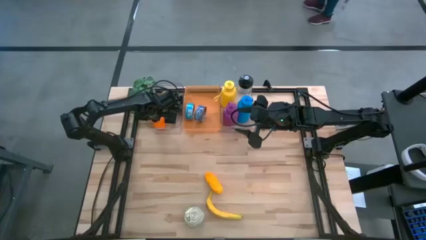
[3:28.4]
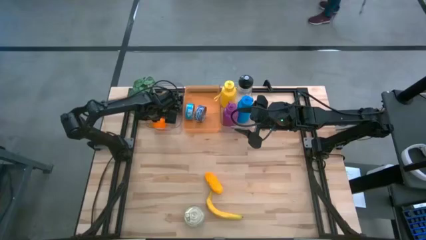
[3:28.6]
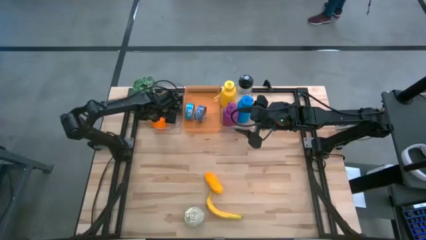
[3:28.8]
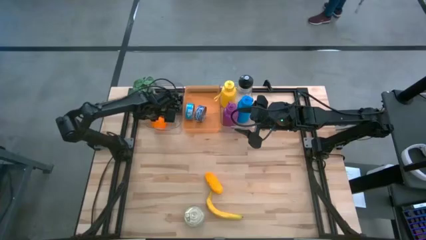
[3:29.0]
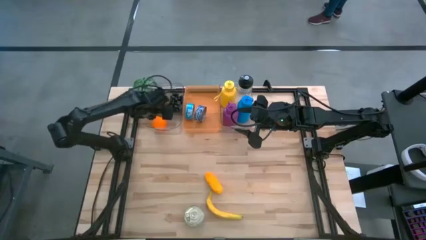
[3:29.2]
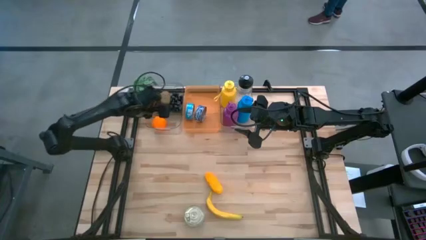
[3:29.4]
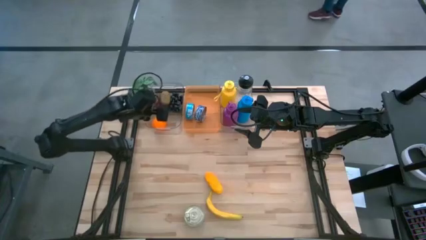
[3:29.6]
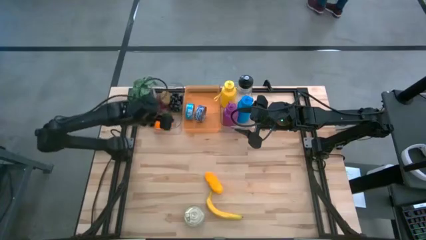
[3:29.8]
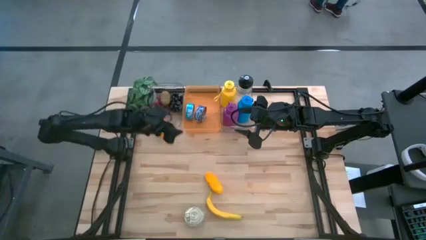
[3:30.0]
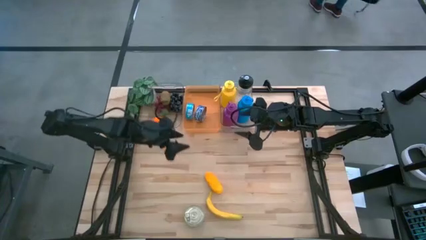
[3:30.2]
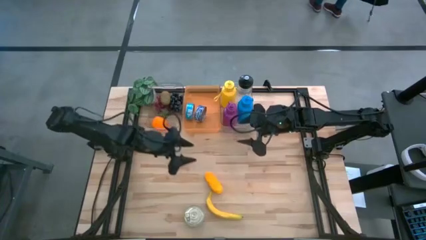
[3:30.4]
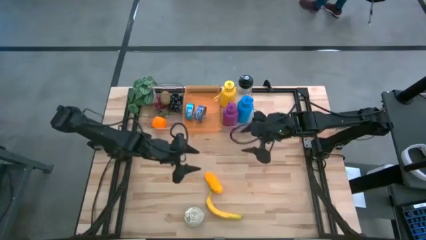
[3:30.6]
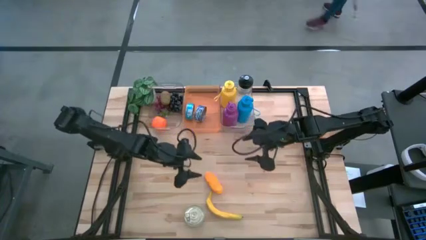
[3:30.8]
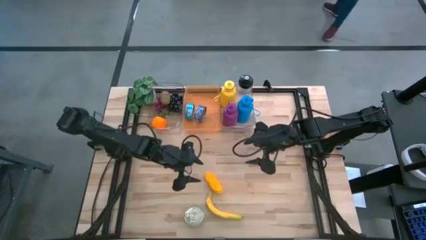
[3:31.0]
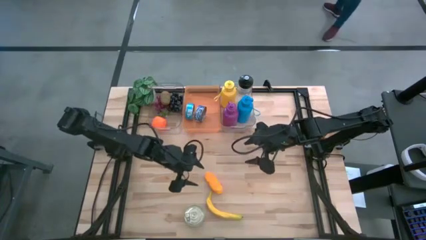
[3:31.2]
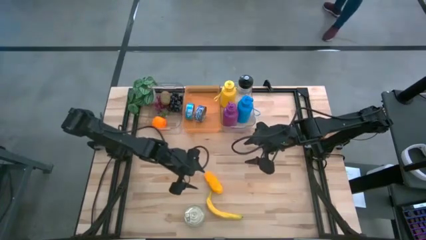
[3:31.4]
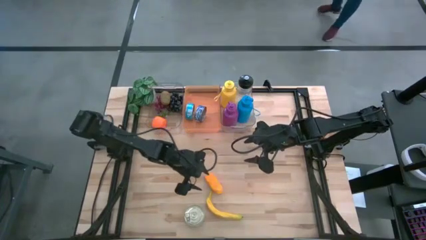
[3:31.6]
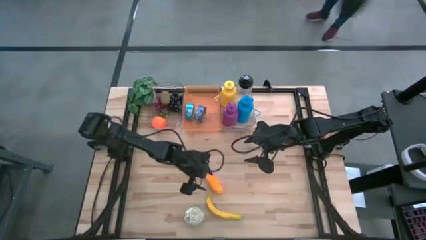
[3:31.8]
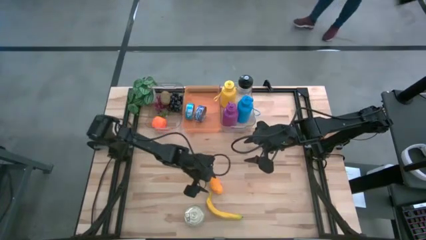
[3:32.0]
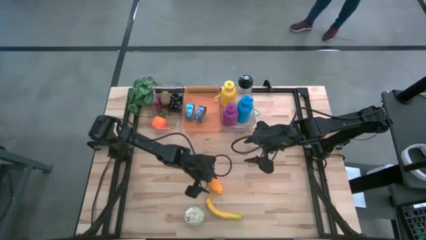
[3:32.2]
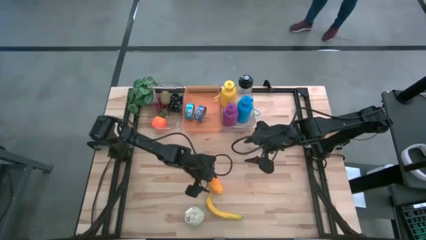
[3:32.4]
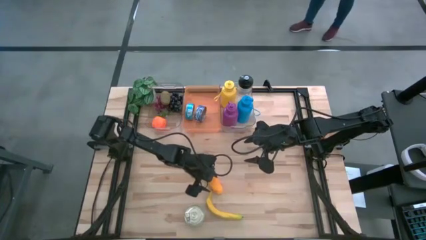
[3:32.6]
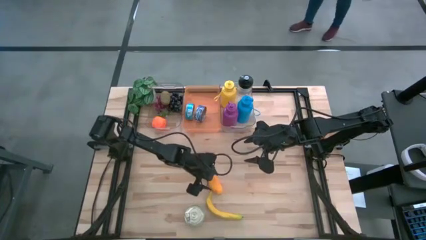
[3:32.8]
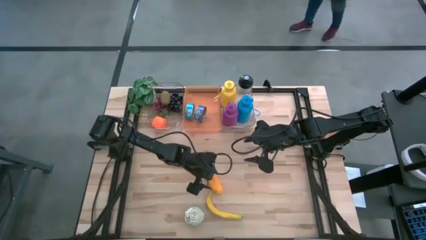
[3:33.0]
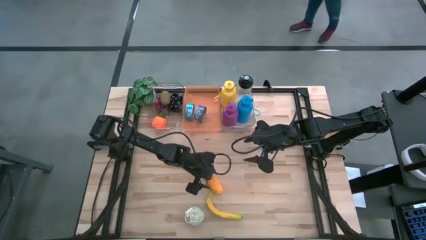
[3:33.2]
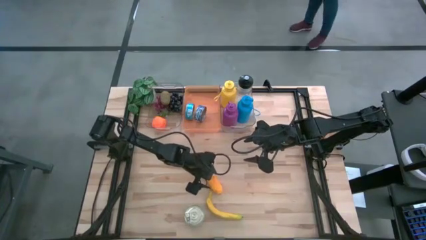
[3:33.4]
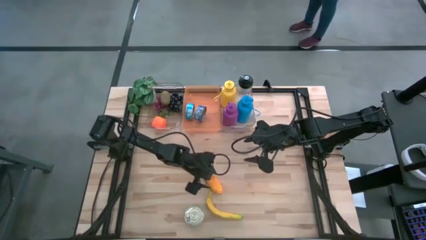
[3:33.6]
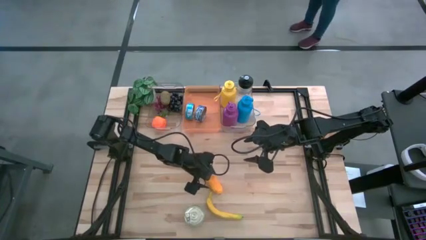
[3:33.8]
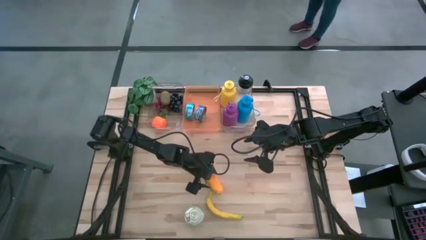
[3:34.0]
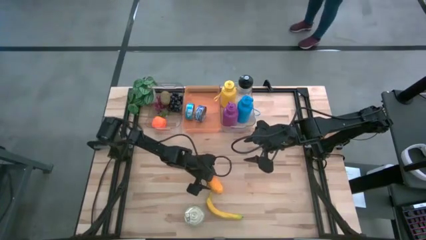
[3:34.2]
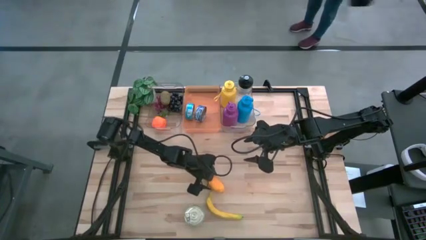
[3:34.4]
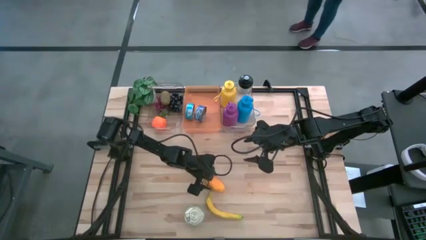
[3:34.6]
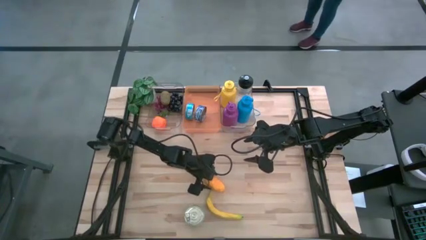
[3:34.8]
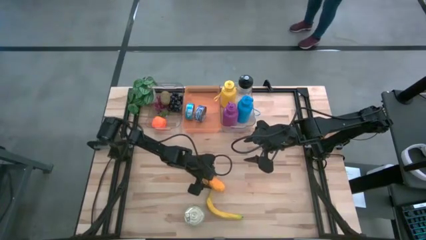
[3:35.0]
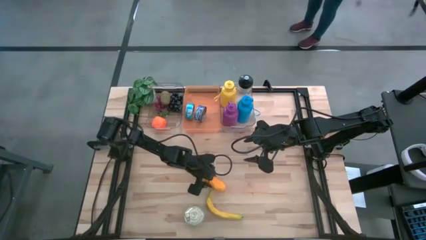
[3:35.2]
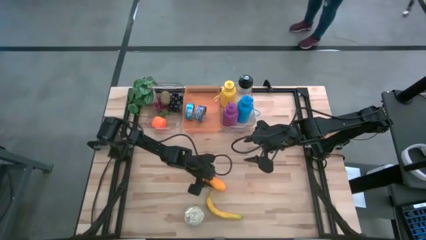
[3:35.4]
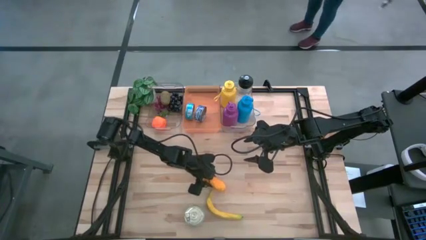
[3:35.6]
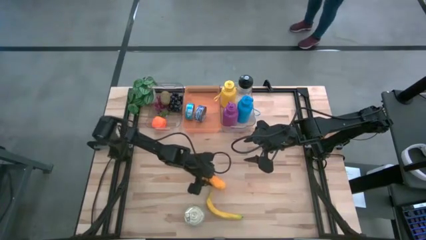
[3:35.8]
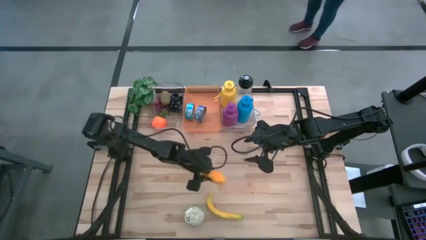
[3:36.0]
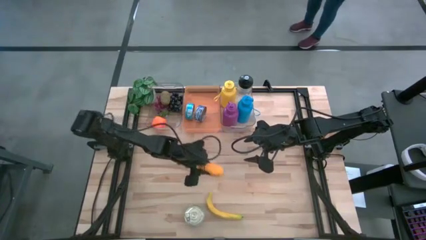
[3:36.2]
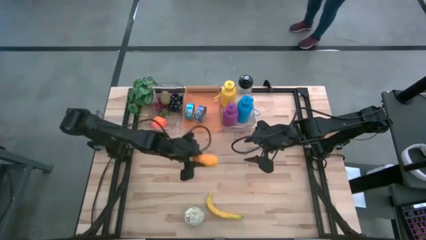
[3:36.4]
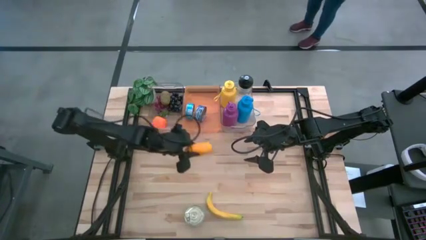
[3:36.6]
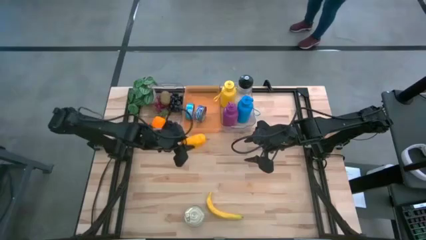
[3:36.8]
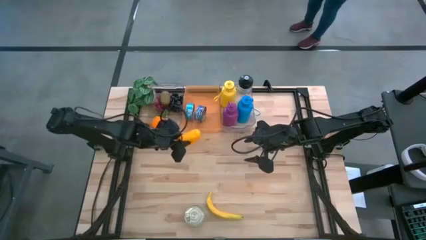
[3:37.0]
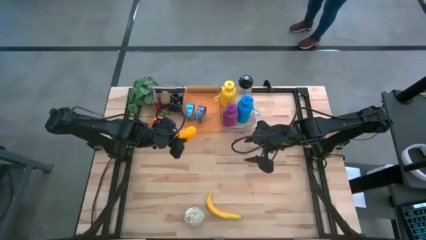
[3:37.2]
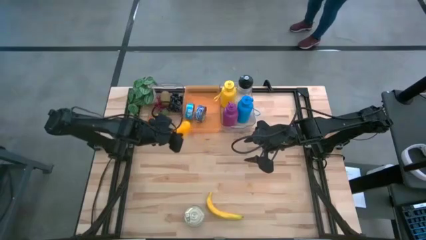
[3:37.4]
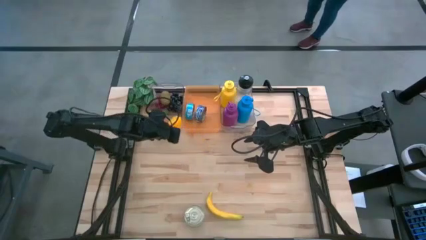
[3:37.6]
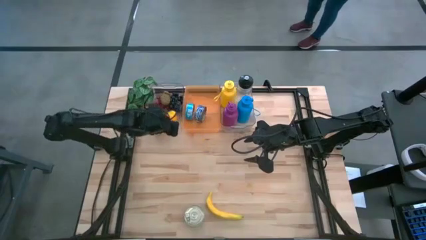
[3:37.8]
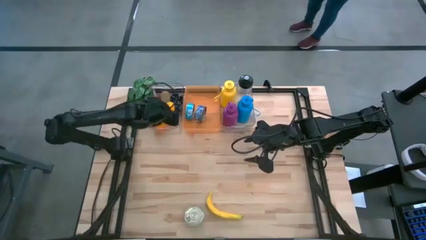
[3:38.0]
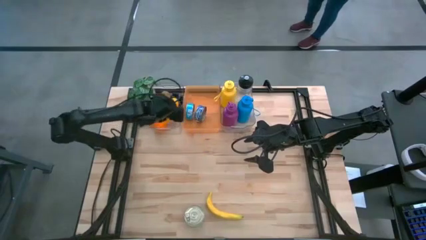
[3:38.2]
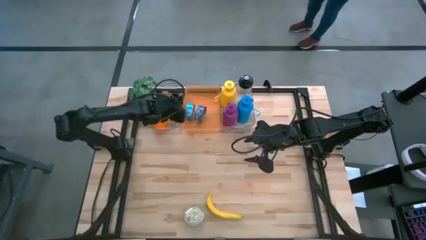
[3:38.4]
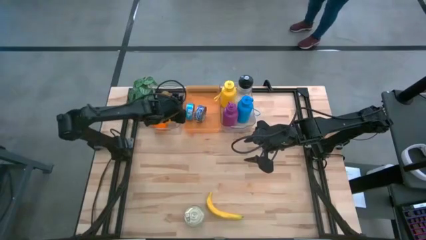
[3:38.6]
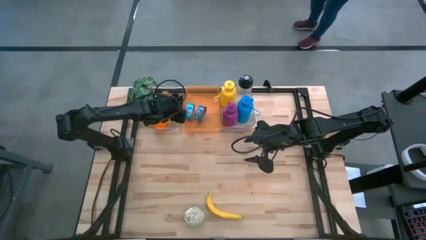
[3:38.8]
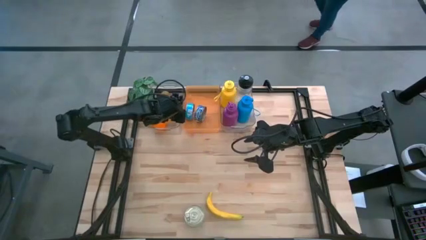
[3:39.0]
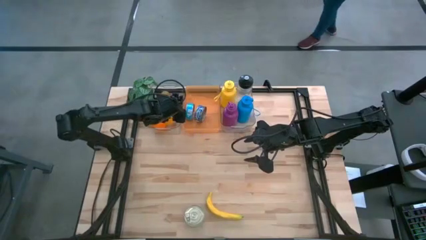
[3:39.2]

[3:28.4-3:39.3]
Task: Pick & Place Food Item
Put the yellow mango into the left transparent bin

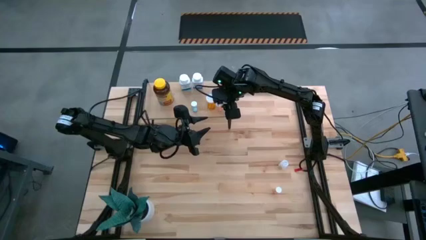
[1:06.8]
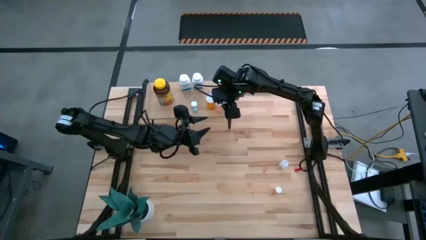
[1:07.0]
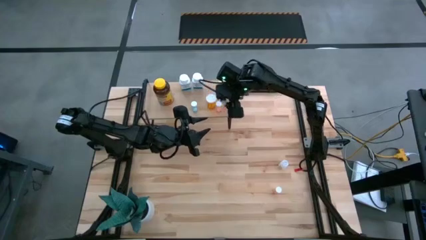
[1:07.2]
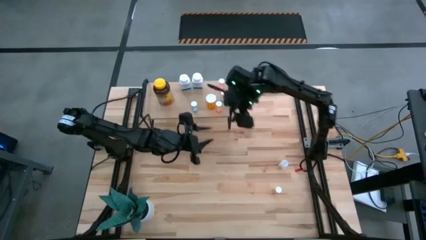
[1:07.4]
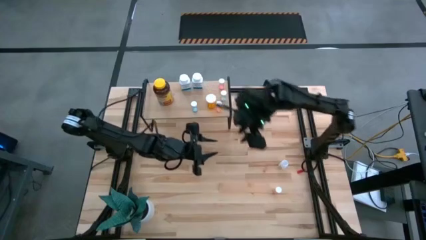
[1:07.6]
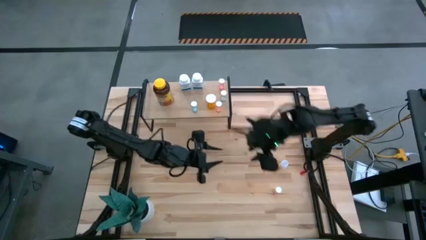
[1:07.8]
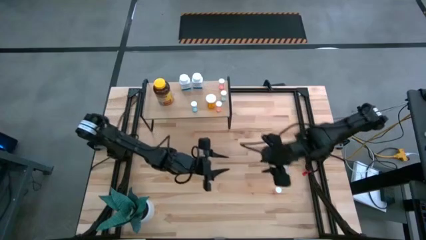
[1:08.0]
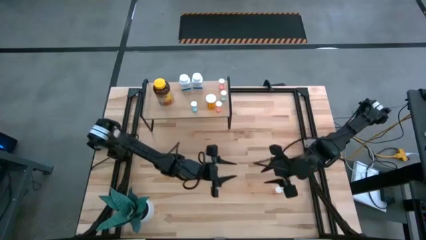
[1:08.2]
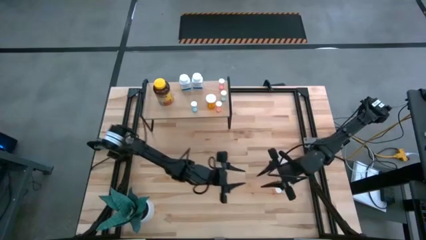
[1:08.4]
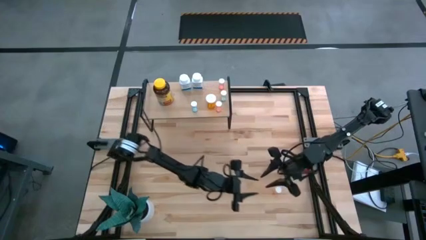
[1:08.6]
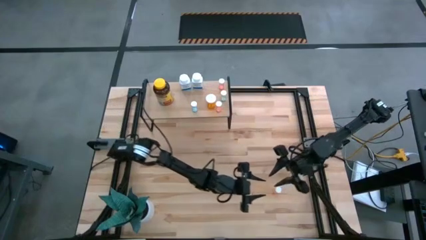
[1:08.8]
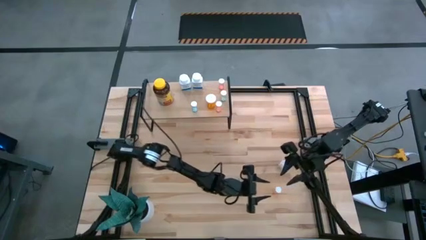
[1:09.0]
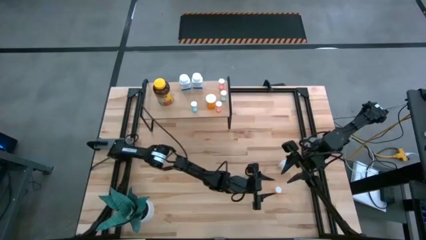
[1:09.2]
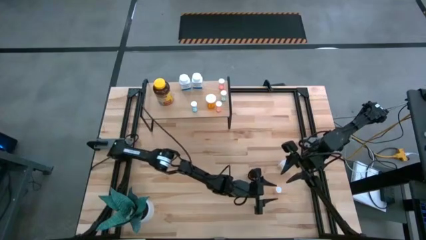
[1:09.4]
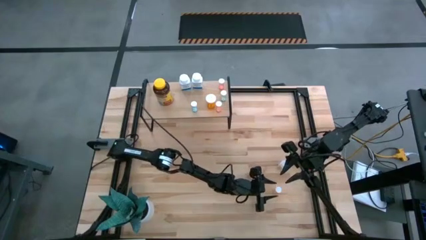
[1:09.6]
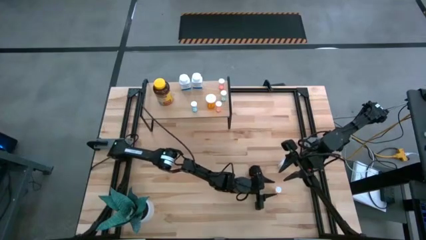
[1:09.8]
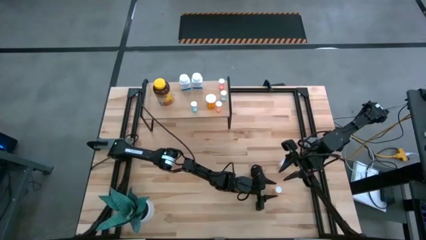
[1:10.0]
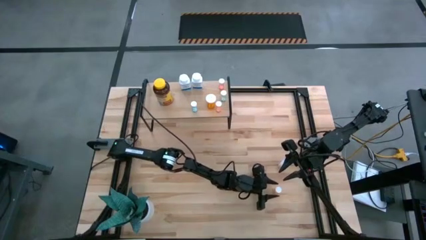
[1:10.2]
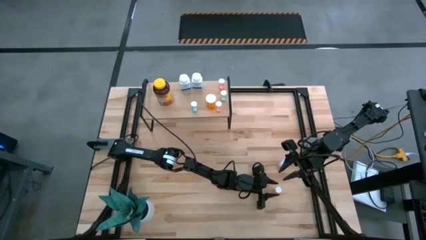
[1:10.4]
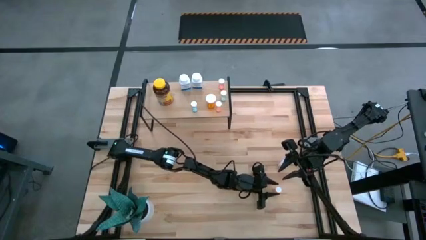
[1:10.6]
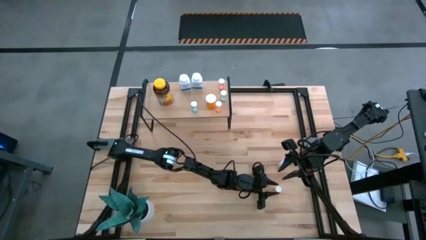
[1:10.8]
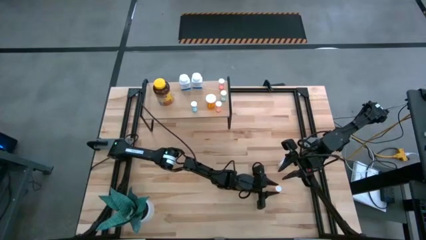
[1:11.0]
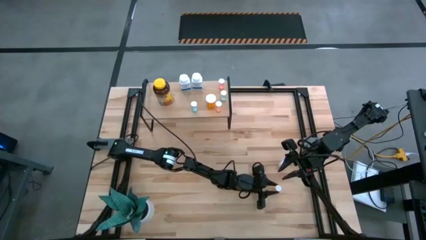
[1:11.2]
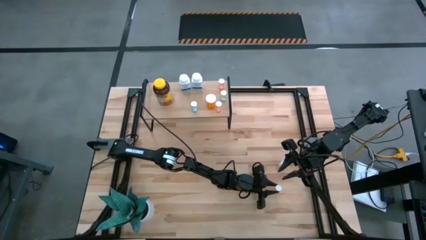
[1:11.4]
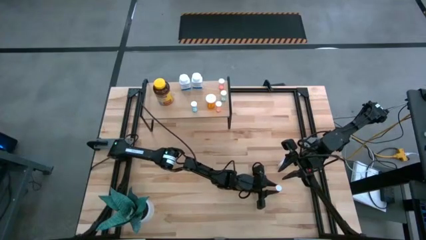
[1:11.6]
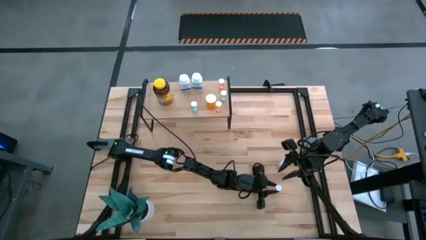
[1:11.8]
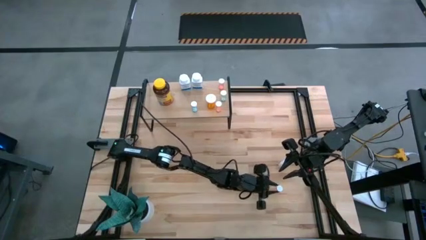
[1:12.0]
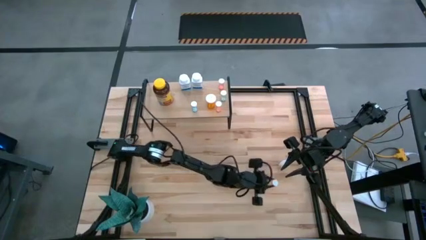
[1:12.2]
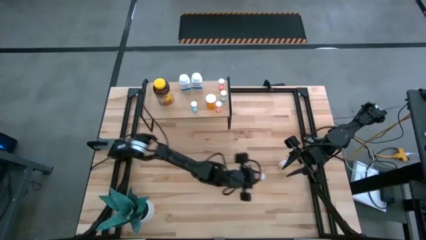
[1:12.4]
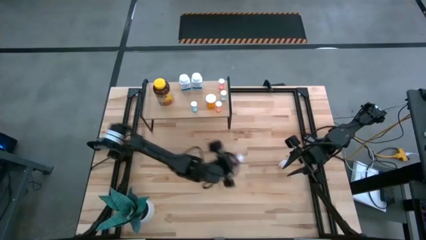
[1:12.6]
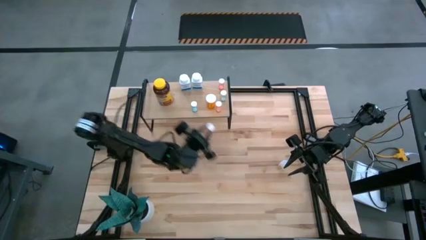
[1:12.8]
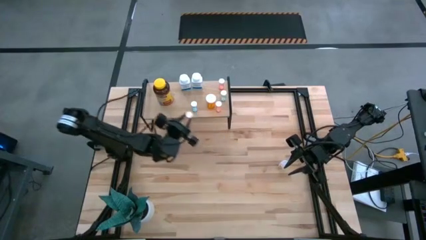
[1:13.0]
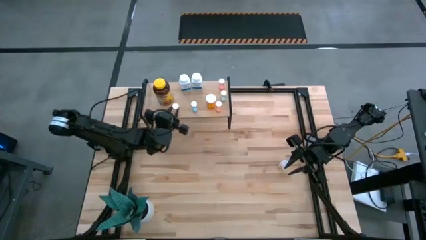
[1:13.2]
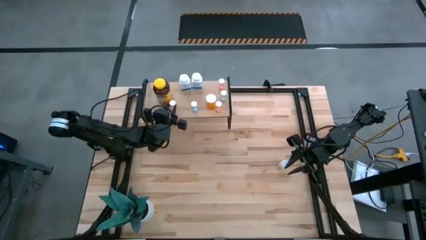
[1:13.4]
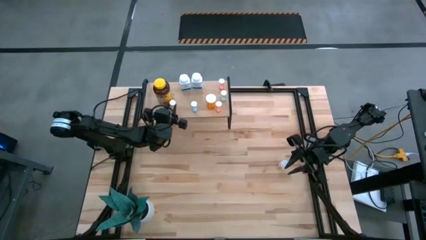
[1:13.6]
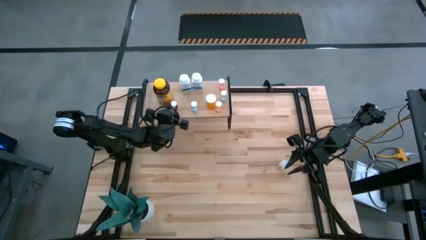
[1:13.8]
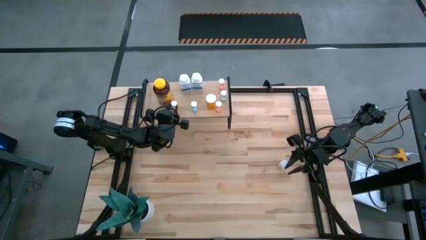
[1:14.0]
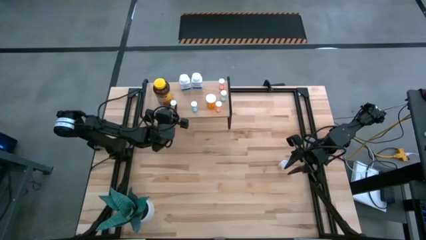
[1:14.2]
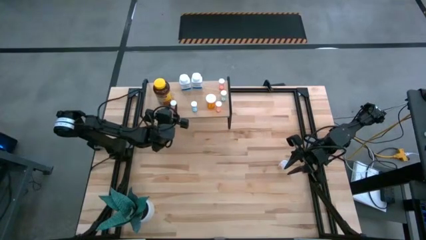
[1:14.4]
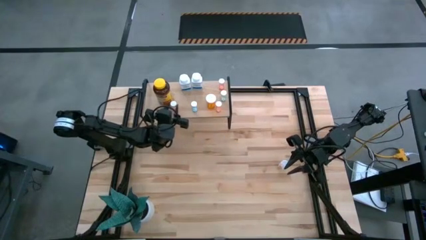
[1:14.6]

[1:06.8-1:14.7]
Task: Pick and place medicine bottles onto shelf by color
Put the pink pill bottle on the shelf
